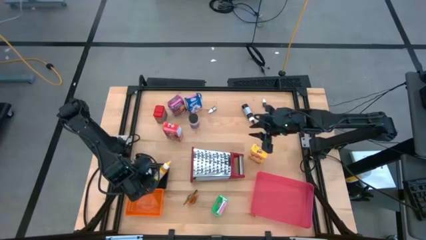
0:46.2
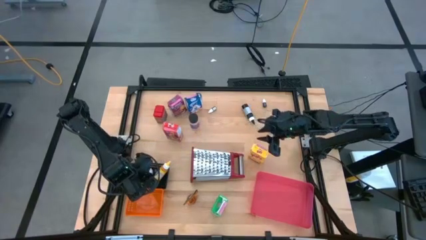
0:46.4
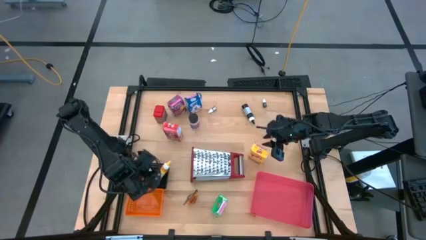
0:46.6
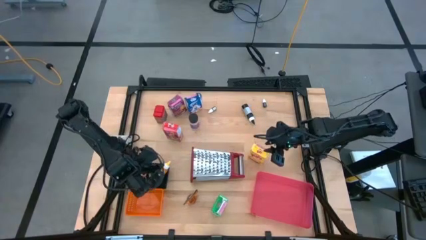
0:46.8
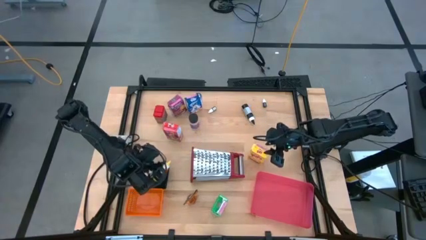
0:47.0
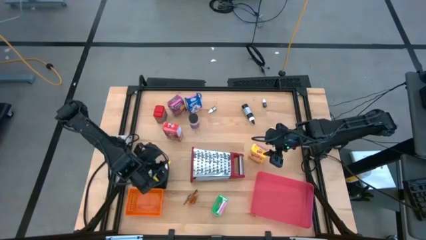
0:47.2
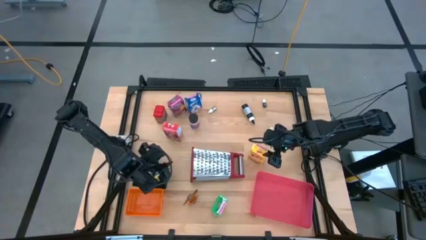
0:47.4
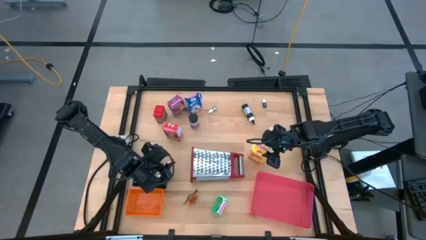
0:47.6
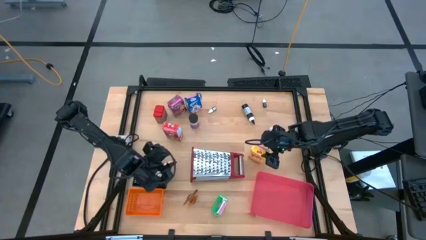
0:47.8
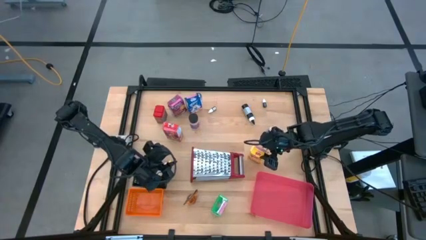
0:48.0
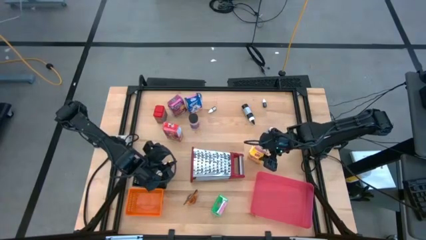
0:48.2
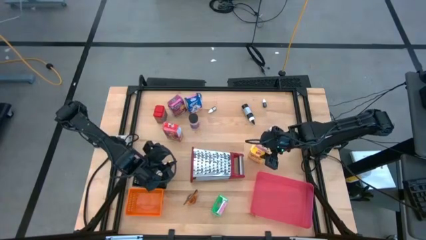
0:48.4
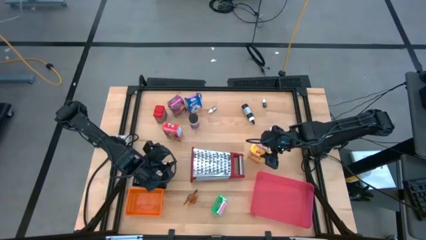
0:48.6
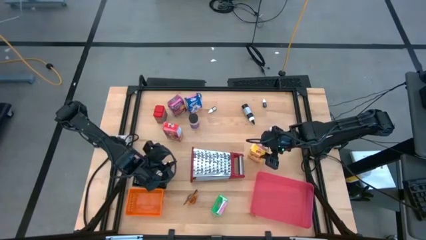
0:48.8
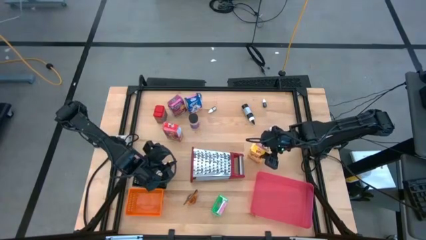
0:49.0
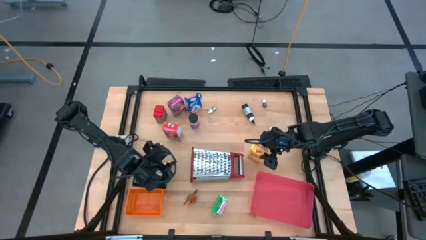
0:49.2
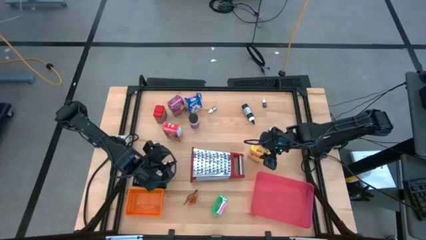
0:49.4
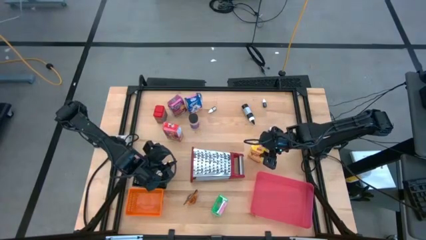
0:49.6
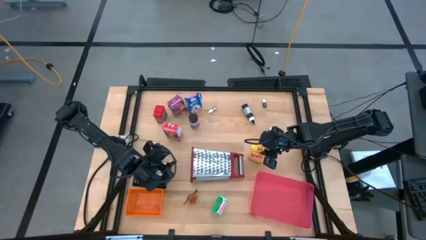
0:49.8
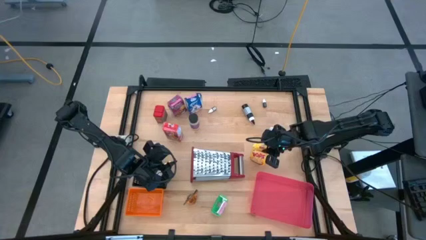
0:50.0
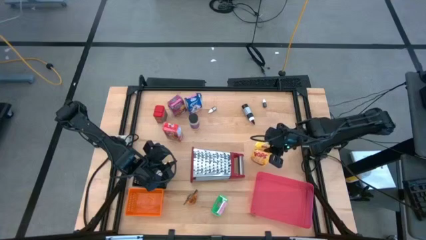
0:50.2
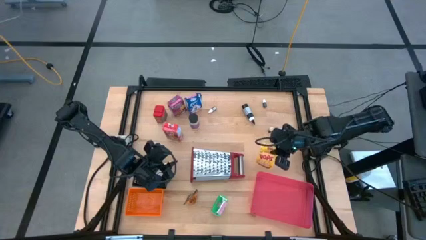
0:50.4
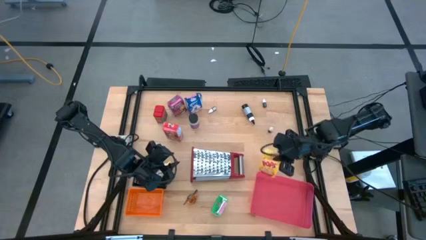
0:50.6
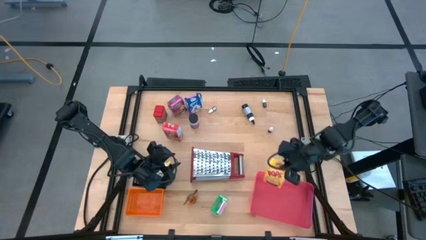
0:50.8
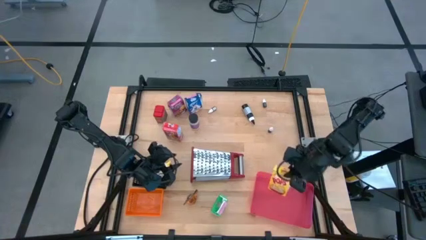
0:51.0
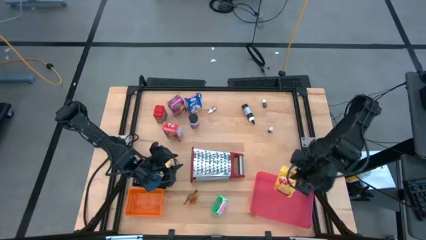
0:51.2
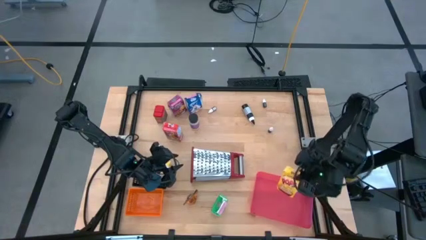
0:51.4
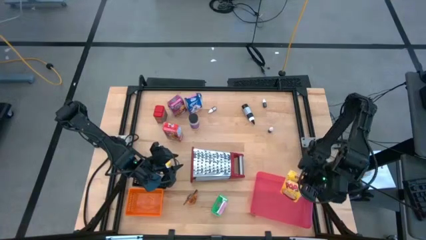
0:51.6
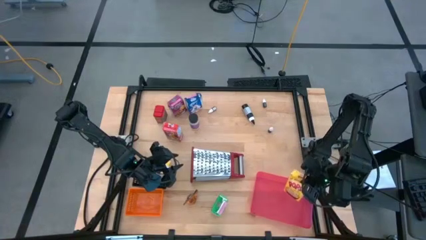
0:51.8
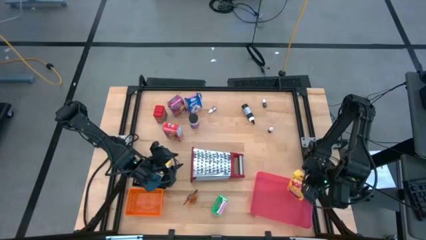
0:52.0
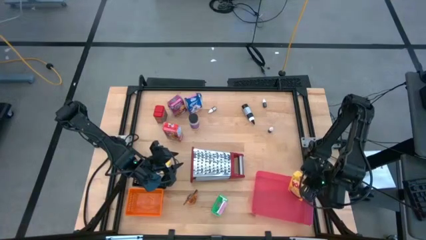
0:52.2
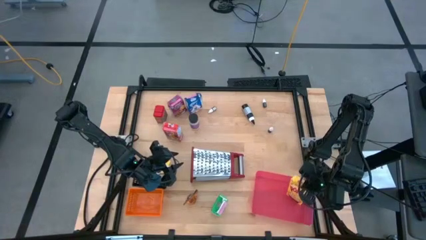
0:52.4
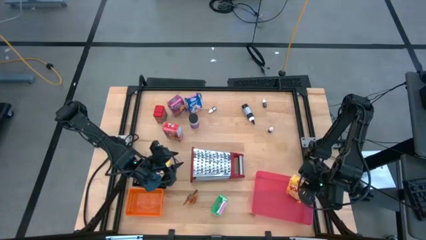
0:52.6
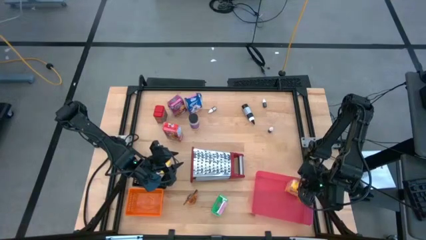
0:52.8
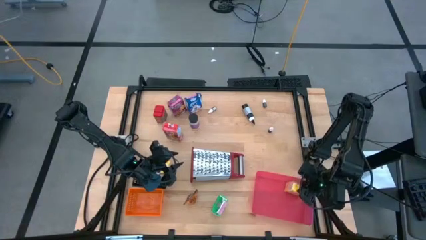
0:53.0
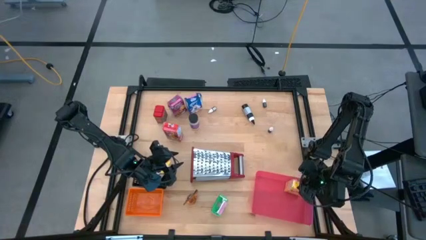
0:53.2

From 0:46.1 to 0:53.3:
Task: Pick & Place Kitchen Items
Put the yellow cereal box into the pink bin

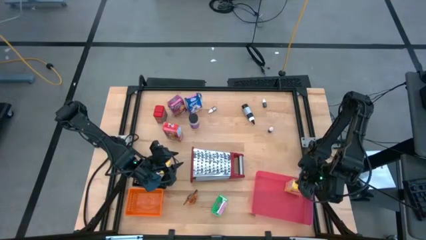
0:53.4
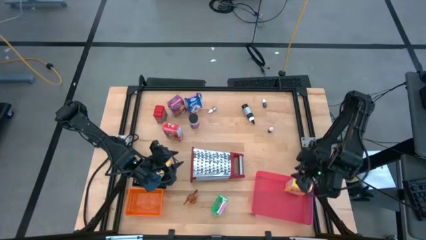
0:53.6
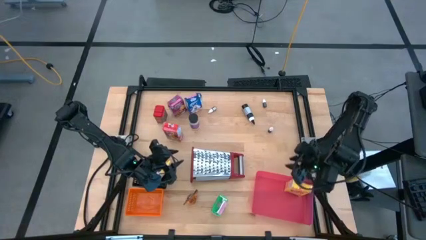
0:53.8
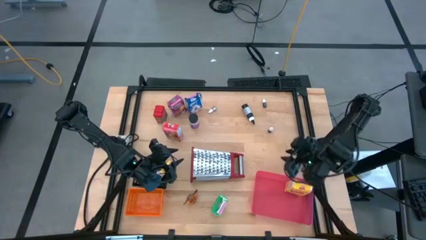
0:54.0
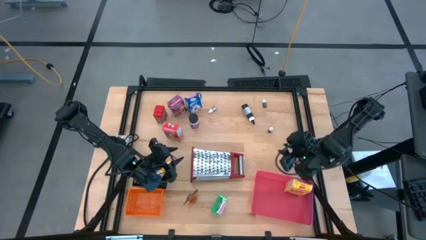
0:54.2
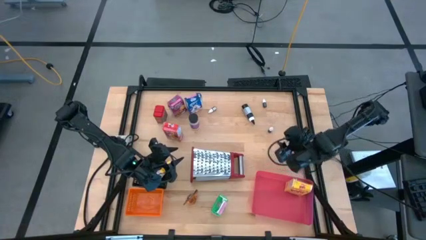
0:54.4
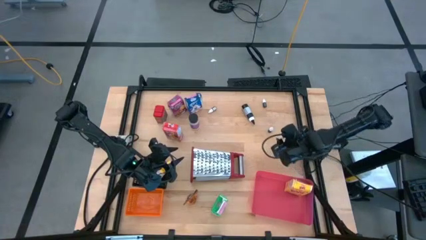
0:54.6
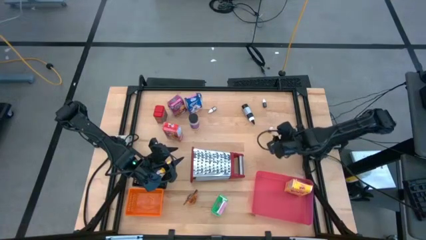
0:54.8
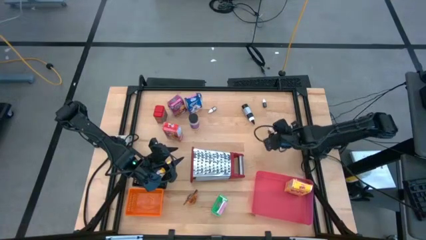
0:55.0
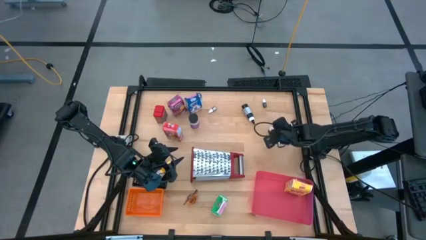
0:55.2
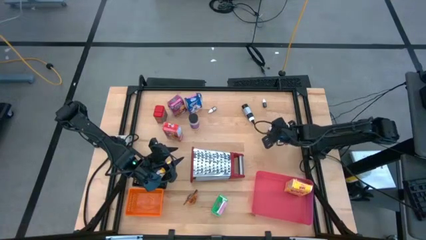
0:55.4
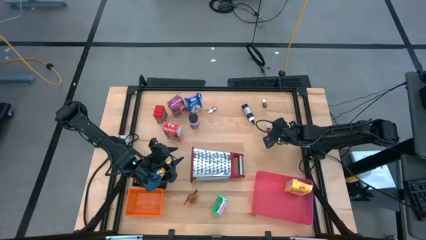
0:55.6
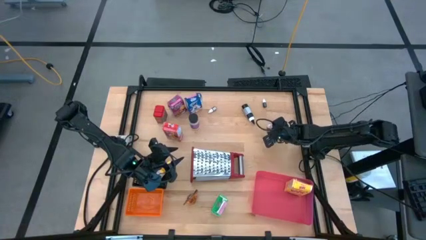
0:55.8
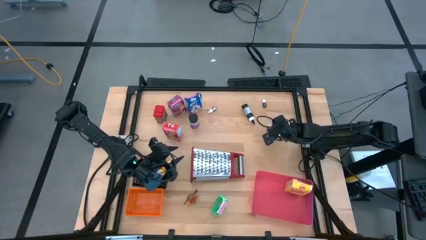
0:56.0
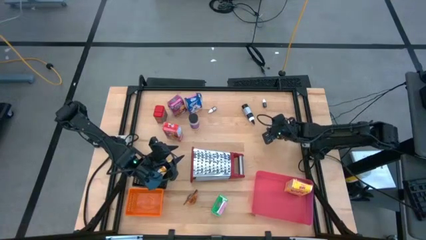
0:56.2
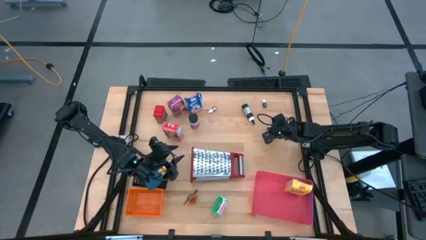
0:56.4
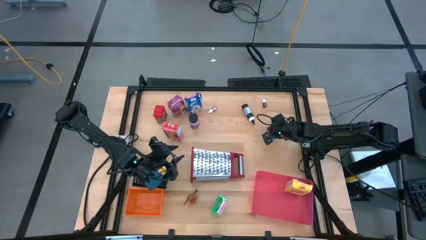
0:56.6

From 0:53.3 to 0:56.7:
Put the small red food coloring bottle into the black bin

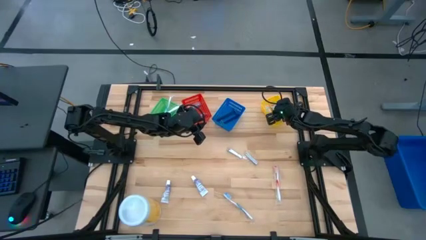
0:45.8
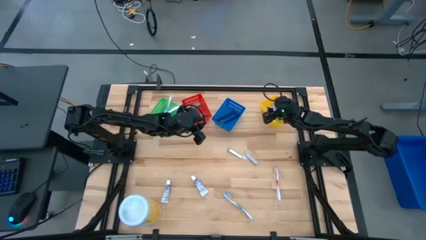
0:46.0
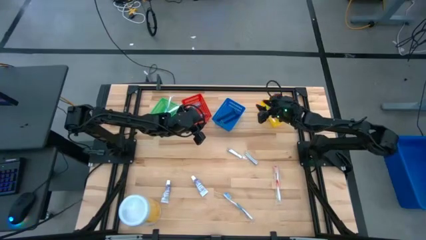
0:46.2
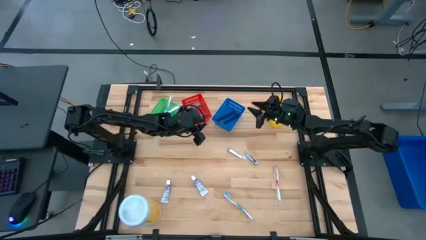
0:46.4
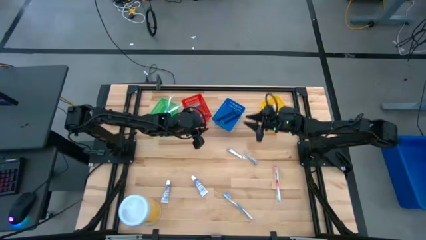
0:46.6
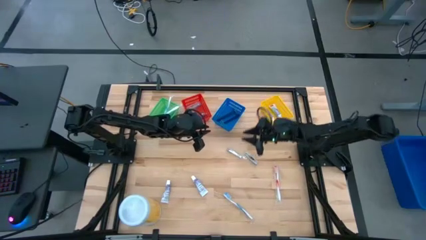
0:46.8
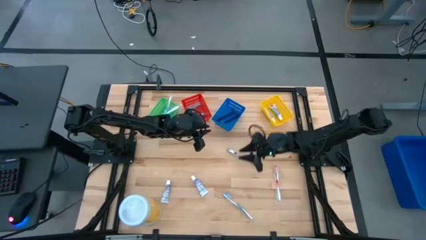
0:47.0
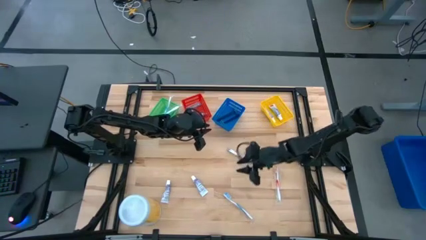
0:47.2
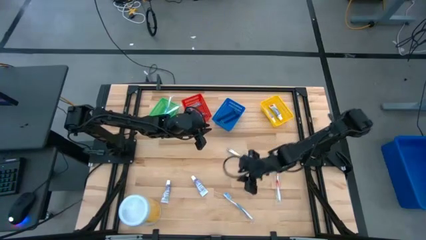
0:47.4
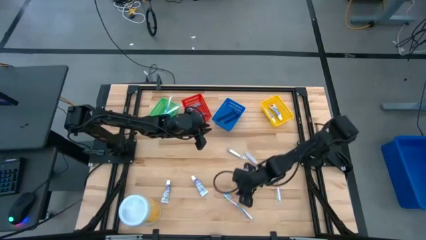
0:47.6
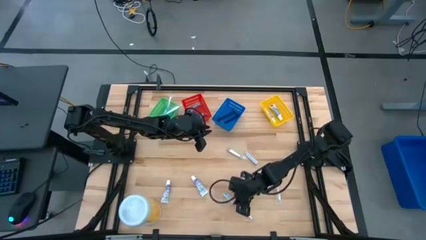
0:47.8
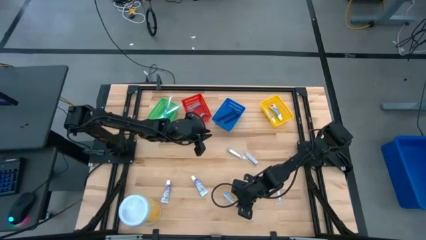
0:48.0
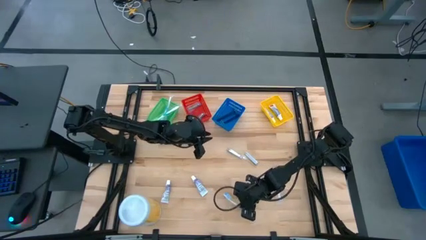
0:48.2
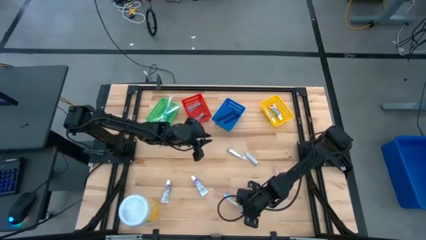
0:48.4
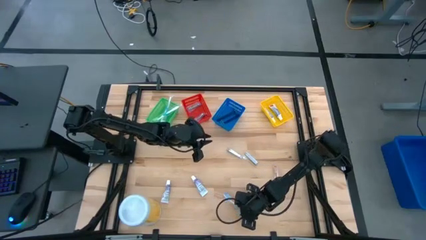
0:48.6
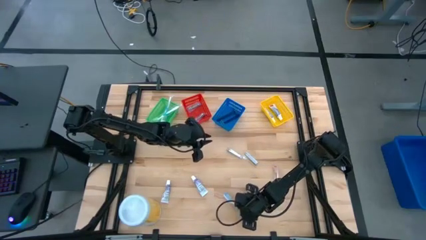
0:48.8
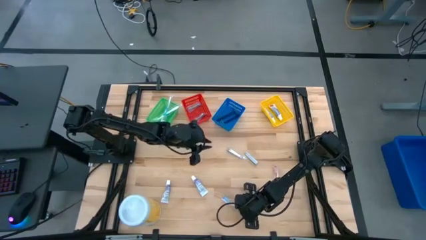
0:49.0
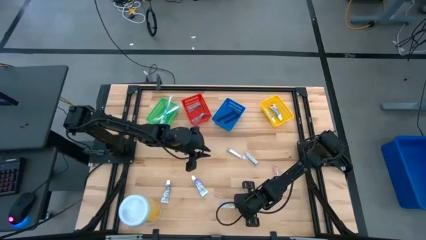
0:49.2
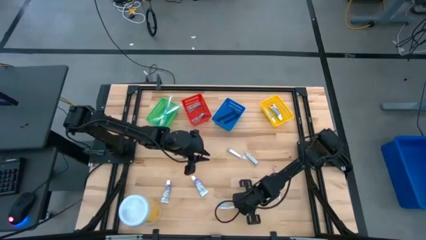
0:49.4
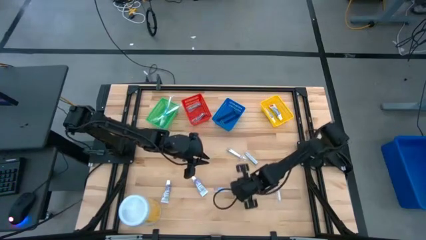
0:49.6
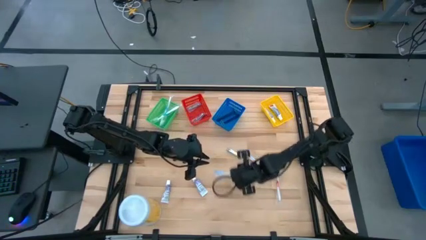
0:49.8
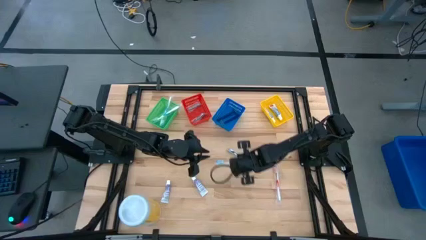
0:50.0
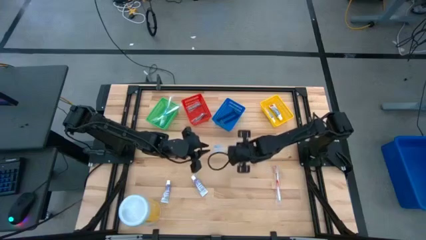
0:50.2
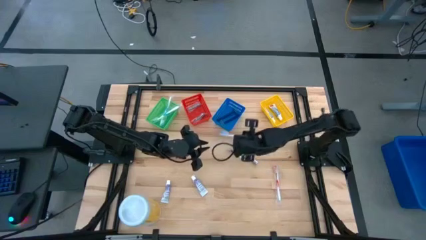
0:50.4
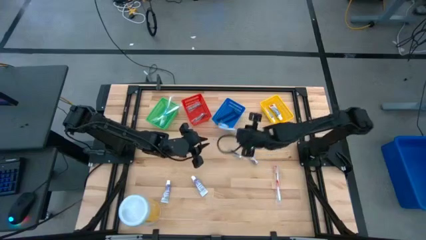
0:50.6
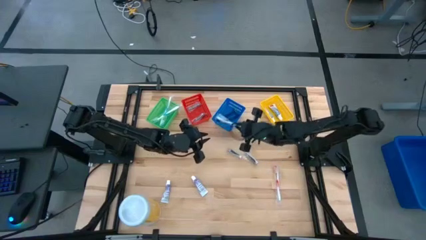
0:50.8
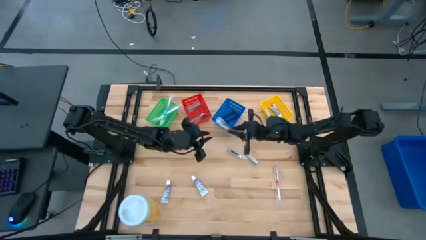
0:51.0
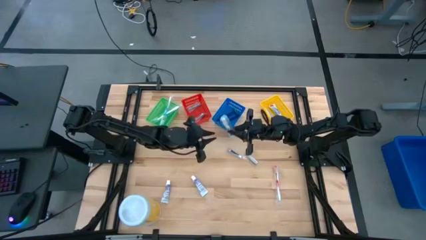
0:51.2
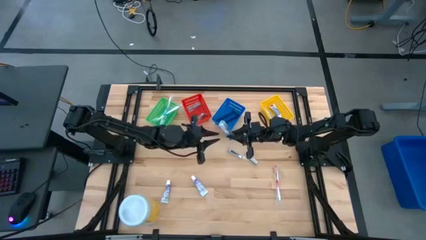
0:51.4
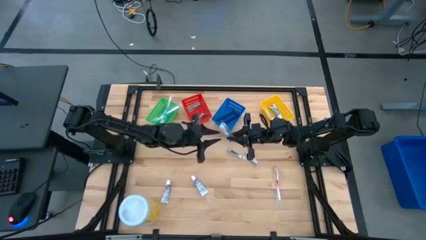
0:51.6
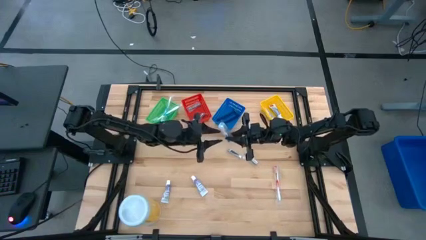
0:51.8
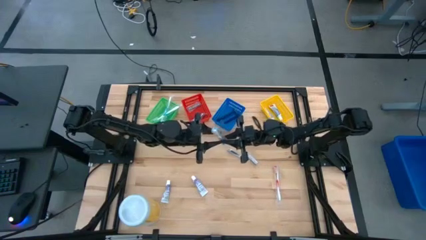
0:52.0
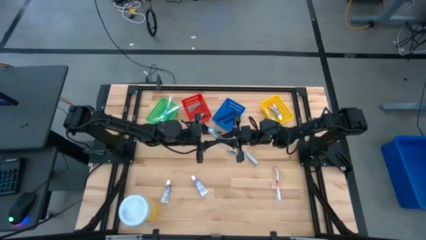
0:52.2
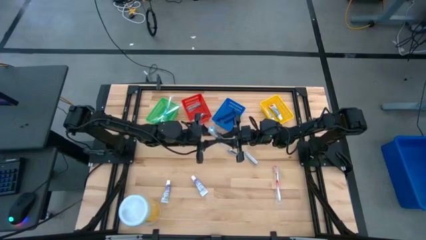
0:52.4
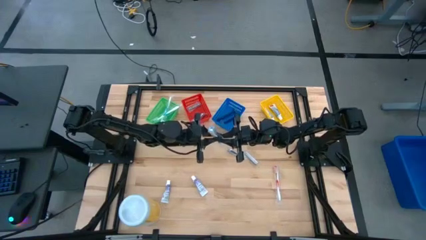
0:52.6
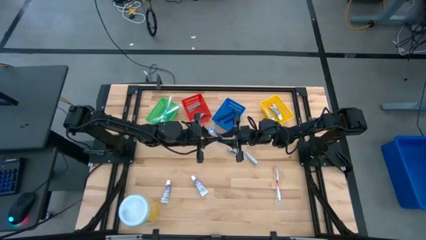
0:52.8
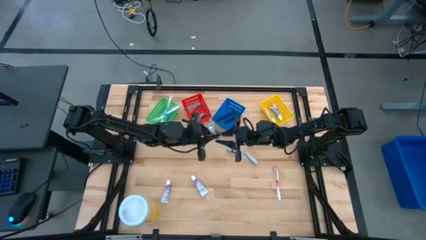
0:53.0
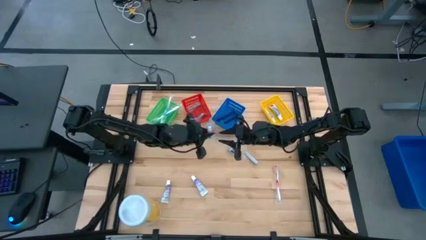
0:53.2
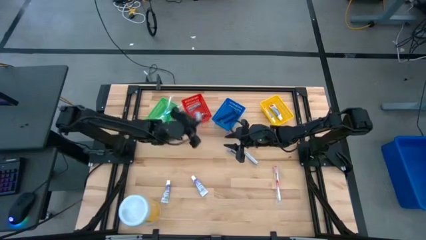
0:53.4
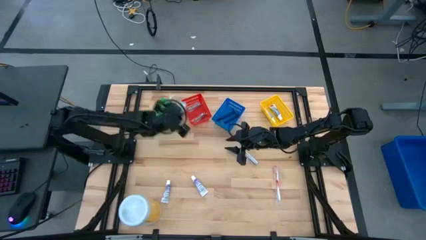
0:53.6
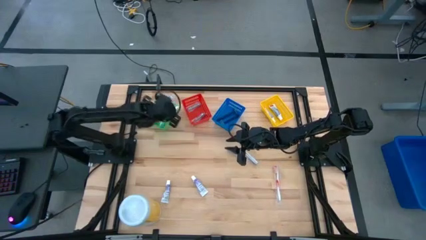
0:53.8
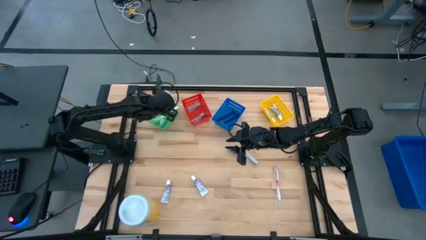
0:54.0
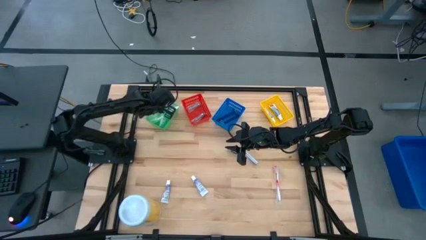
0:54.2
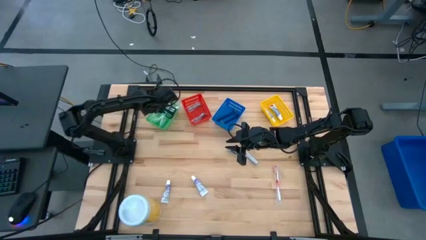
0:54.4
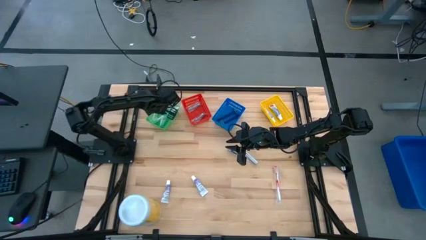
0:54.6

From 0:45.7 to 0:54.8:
Task: Pick & Place Travel size toiletries
Put the blue toothbrush into the green basket
